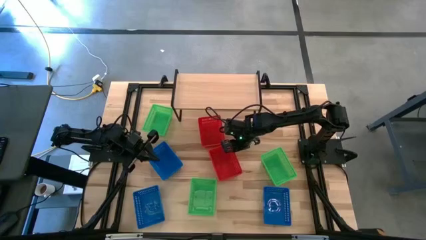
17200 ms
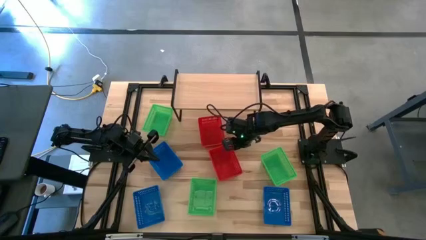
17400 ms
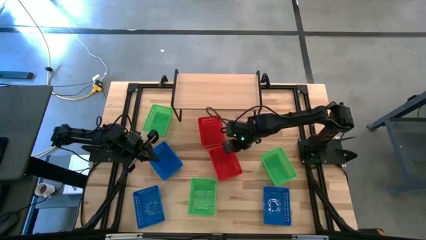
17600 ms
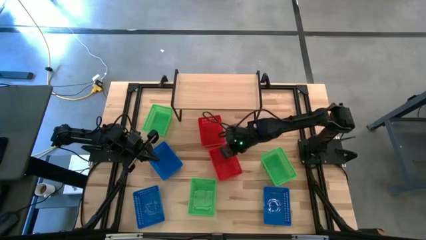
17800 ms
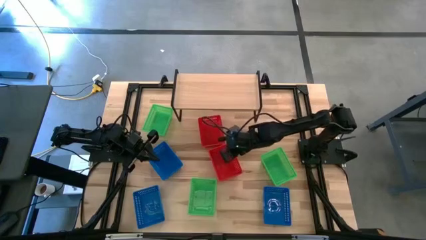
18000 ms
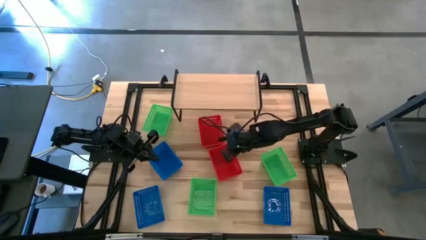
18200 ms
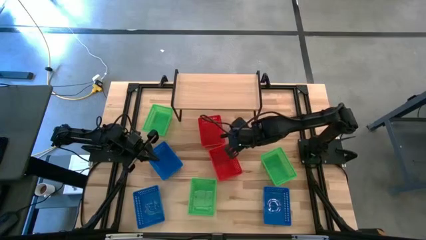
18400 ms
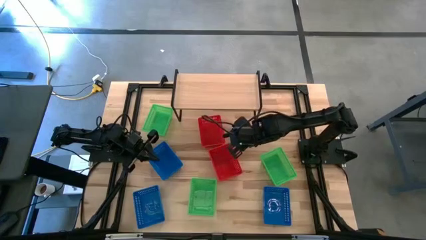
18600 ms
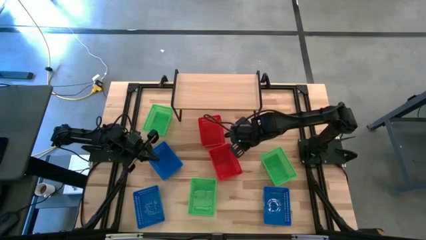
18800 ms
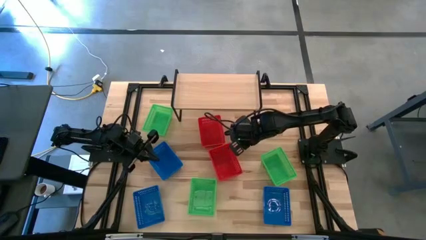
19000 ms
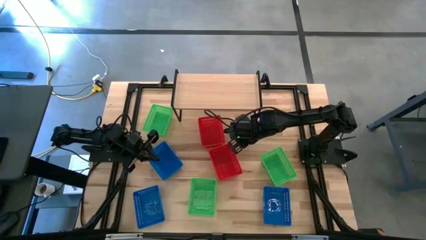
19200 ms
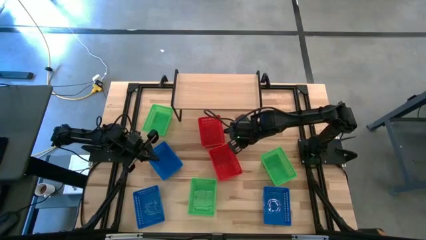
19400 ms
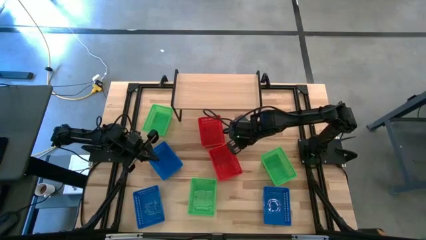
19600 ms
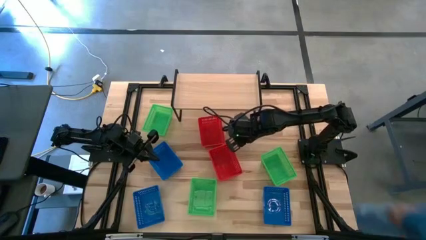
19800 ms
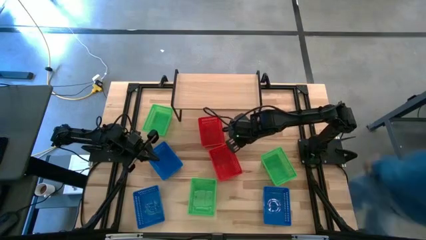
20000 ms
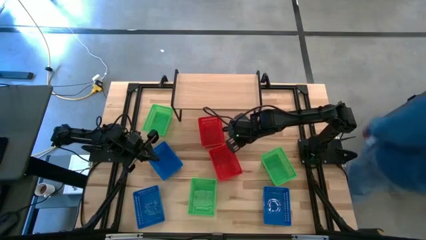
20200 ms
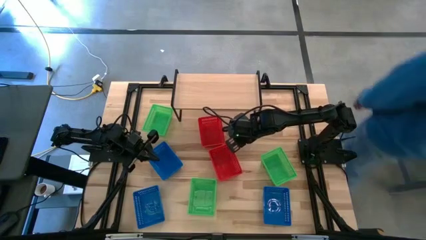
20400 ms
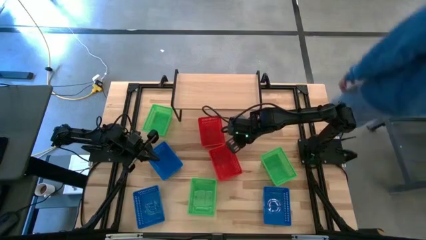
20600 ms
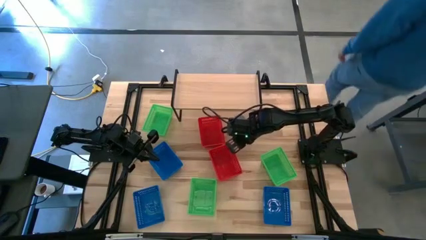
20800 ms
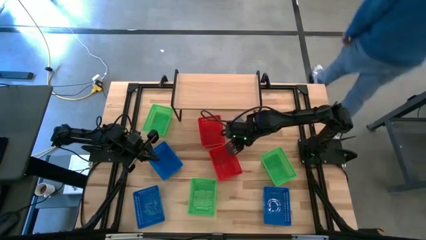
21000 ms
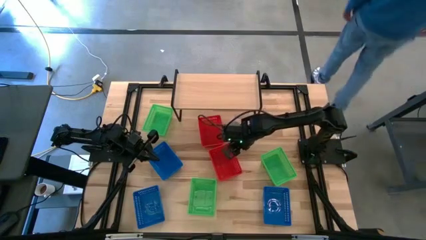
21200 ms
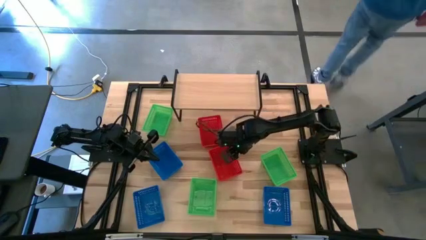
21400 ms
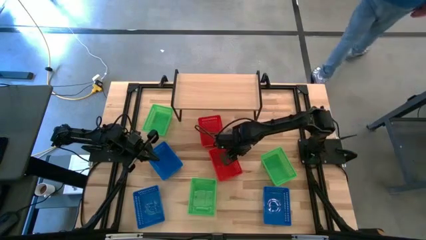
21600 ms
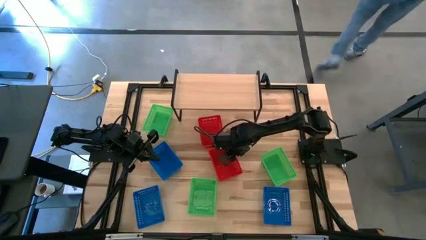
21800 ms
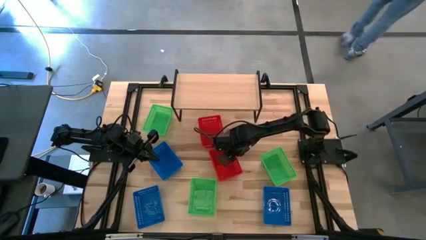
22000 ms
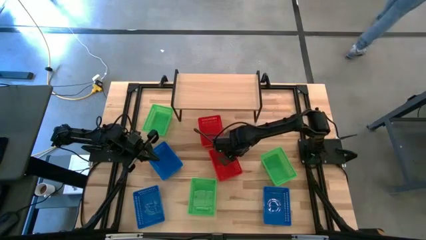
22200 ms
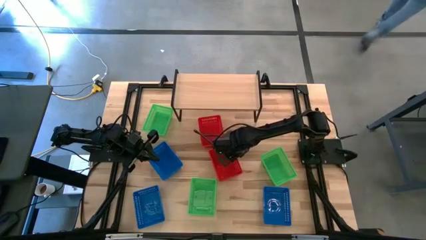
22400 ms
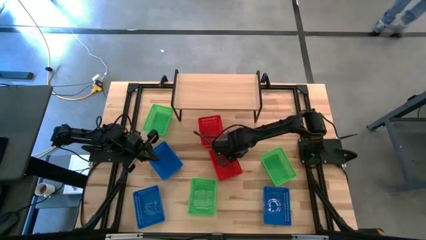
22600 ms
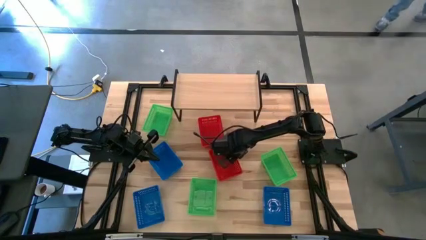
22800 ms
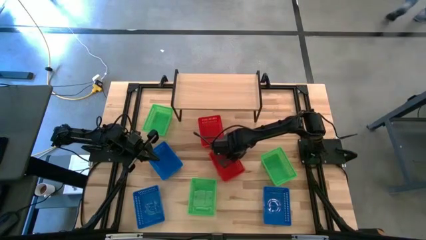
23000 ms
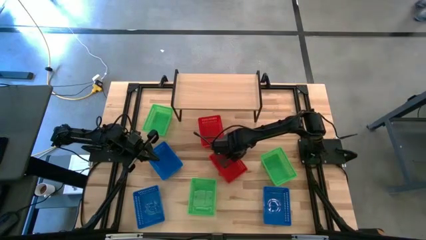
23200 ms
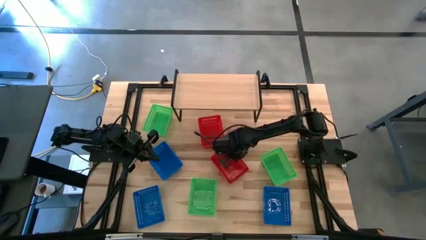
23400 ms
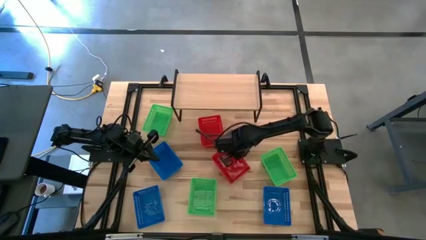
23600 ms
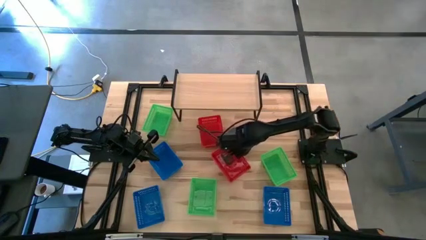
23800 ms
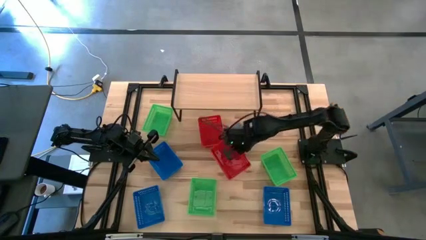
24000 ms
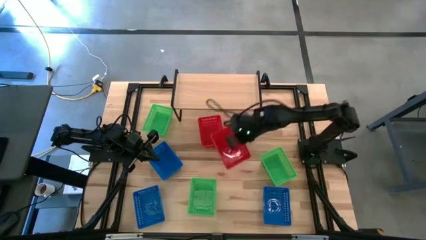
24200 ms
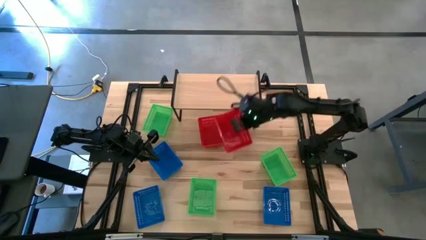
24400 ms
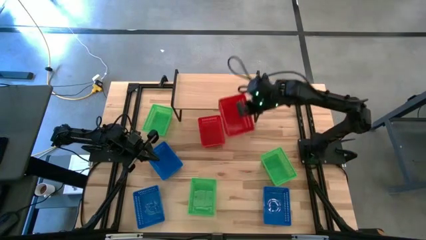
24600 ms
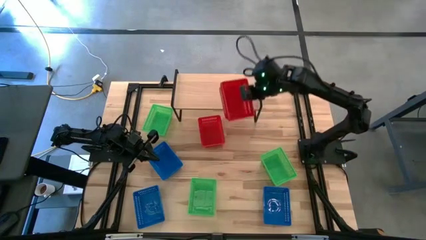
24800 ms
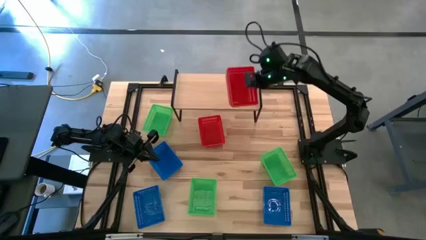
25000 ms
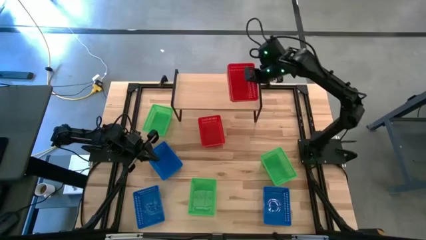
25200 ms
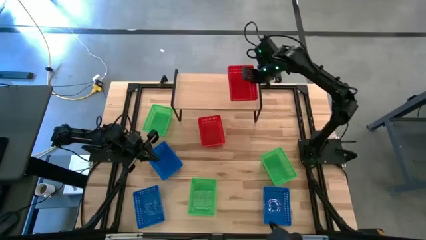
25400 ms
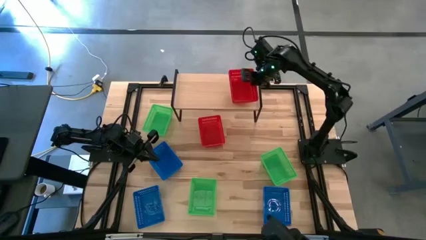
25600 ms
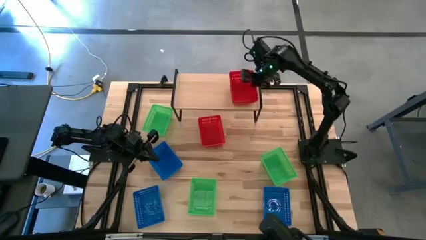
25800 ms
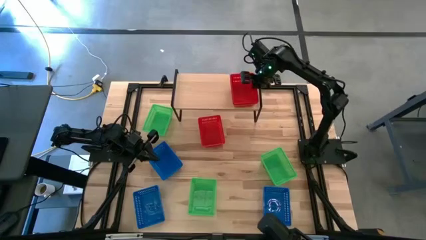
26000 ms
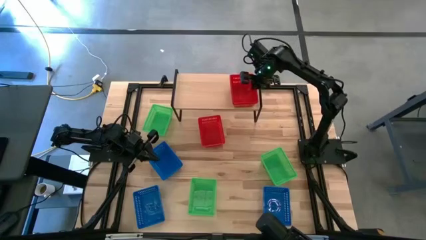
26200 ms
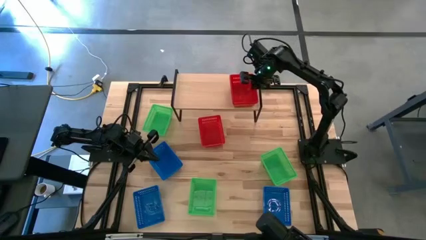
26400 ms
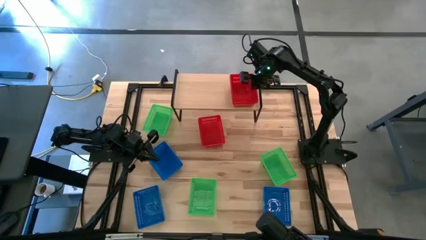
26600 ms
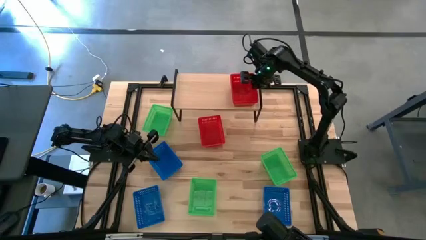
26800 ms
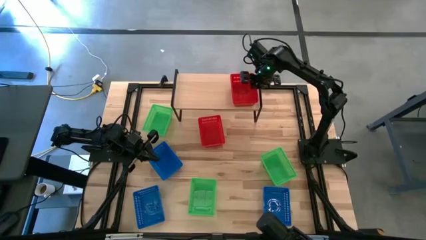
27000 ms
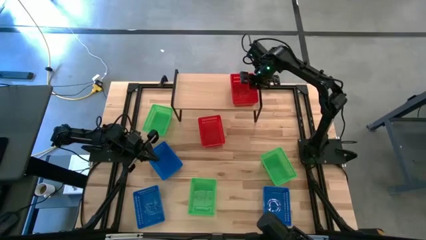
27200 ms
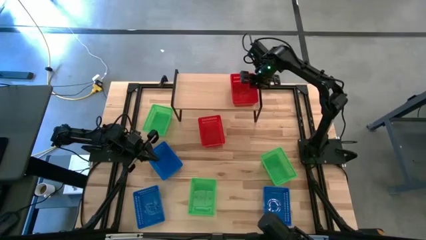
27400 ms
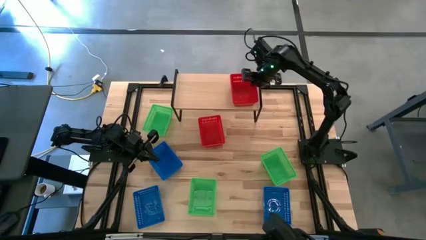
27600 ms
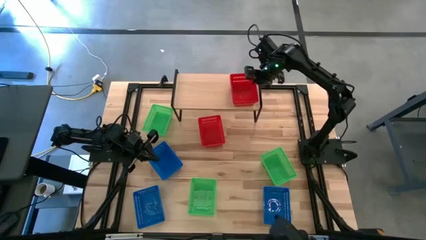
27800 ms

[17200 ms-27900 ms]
Task: Stack baskets on shelf by color
Put the stacked red baskets on the shelf
